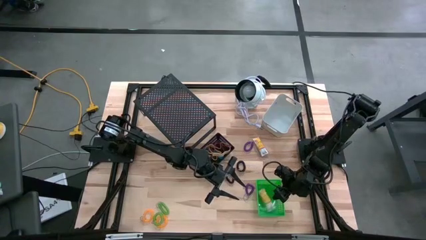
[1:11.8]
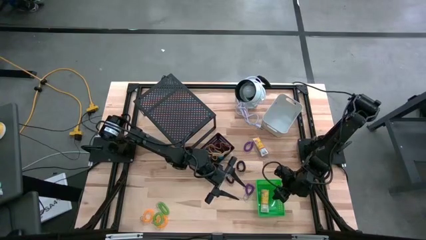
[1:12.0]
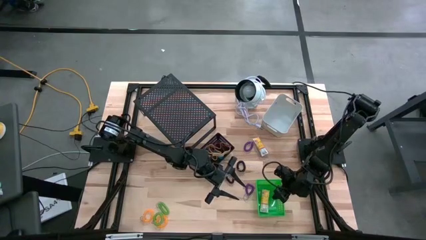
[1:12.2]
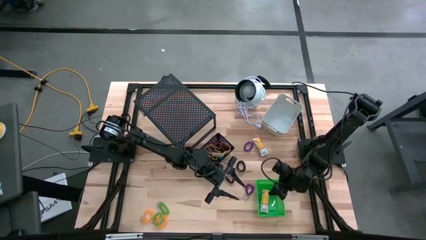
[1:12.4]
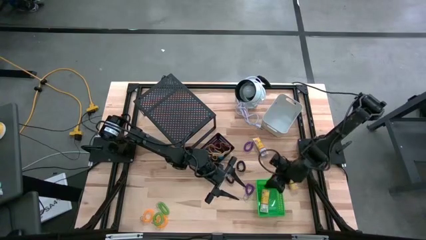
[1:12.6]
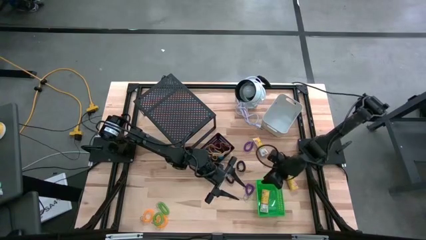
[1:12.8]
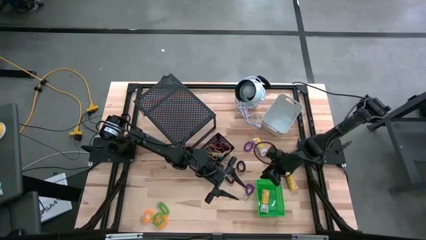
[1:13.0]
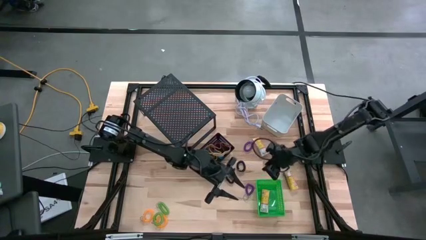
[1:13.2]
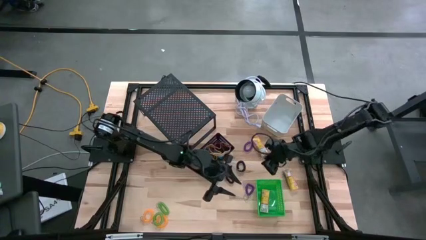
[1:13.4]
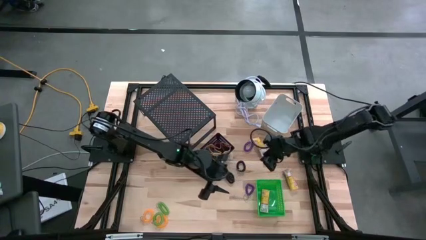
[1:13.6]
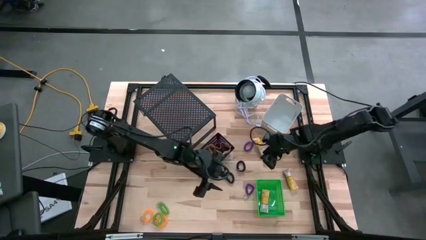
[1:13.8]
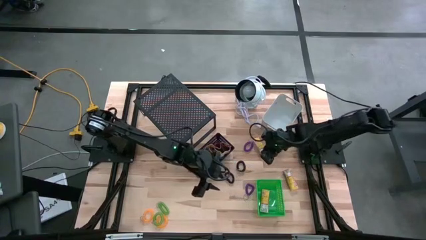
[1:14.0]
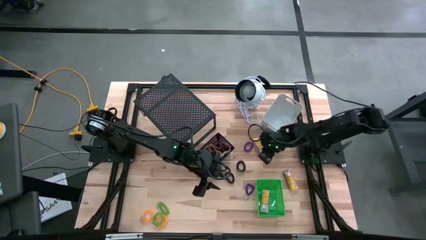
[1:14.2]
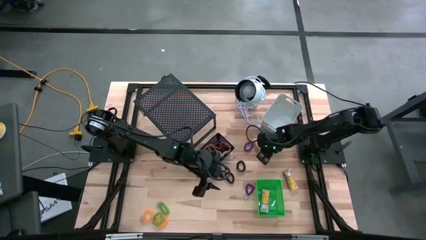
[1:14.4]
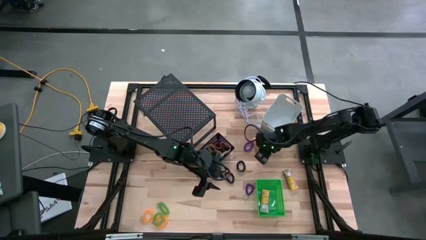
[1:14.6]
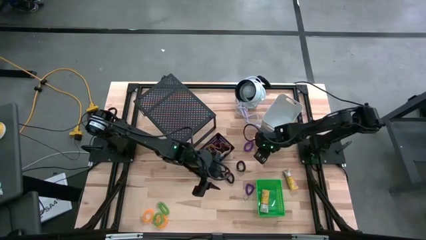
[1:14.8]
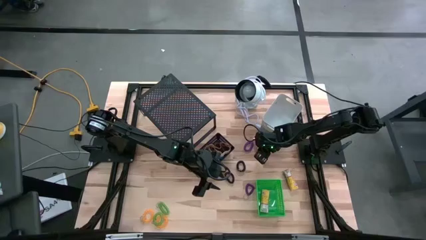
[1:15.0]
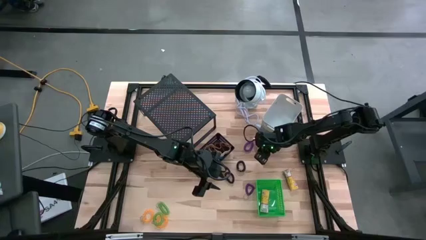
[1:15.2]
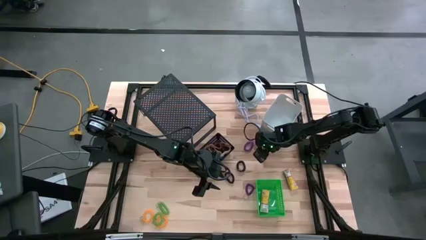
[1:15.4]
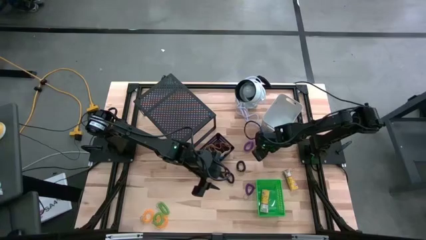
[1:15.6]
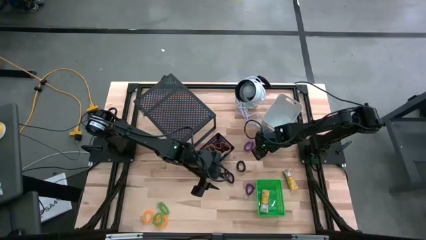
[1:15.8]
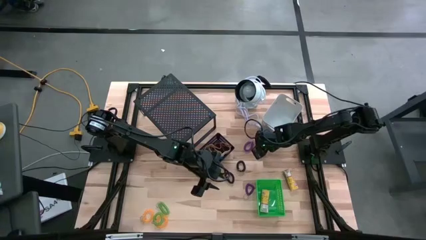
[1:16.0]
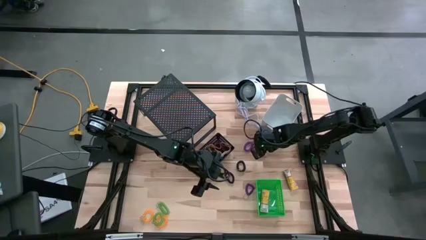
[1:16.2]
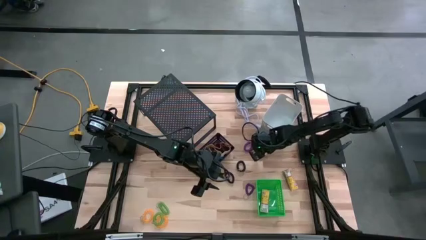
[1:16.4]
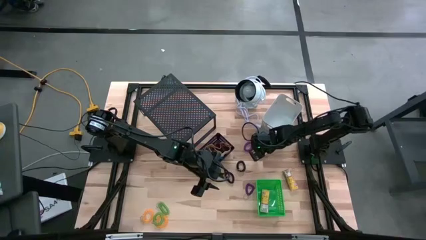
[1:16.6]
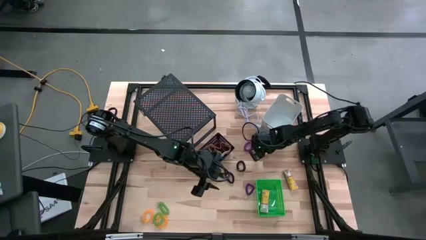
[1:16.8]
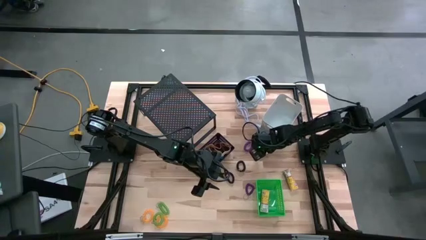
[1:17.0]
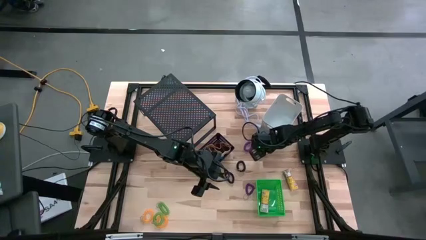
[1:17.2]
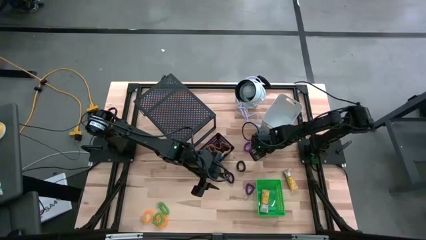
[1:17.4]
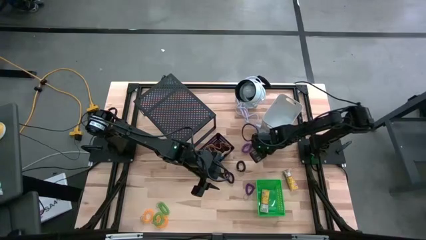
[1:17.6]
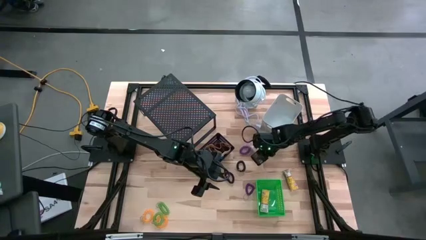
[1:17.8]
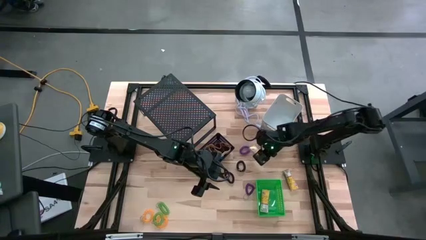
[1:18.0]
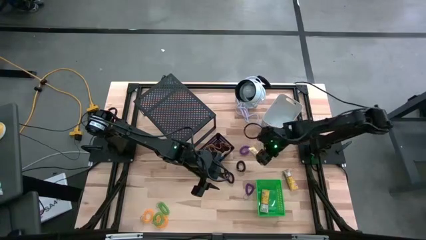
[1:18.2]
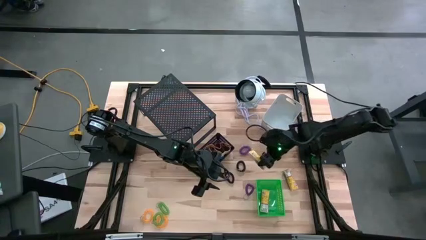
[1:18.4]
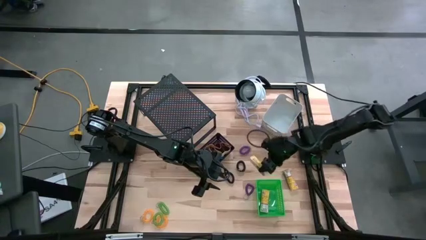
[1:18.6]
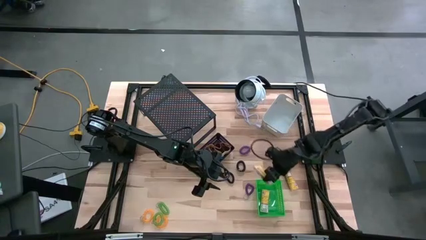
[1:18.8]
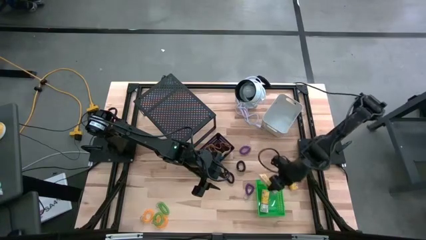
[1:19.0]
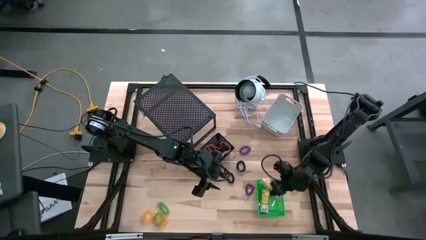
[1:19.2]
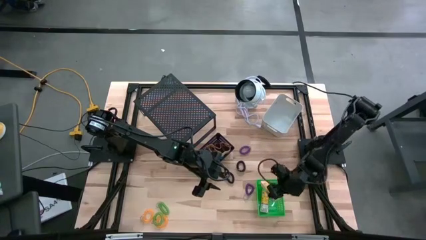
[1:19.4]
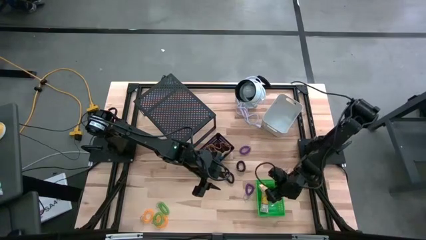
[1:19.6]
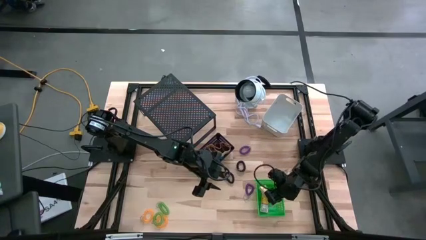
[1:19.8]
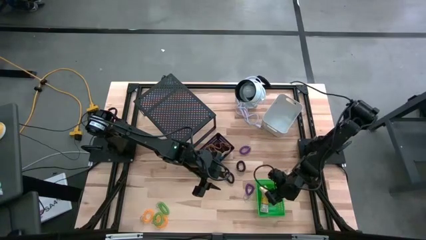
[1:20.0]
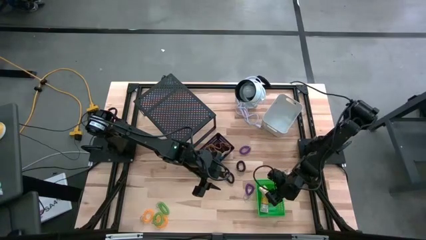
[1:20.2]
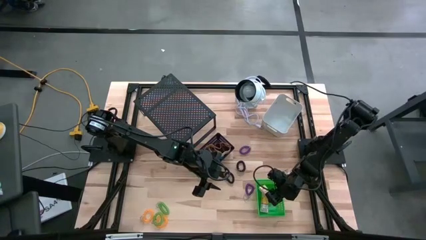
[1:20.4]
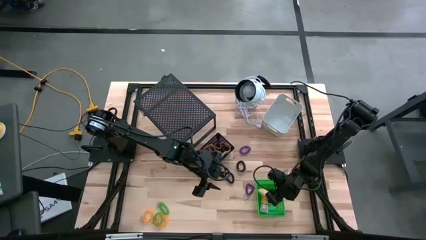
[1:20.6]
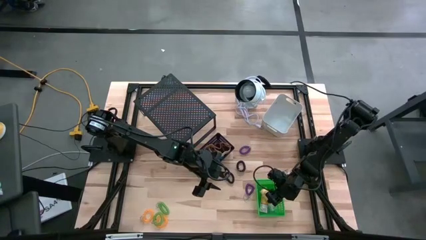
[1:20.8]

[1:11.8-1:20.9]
Task: Pick & Place Office Desk Supplies
Put the left crayon box into the green bin

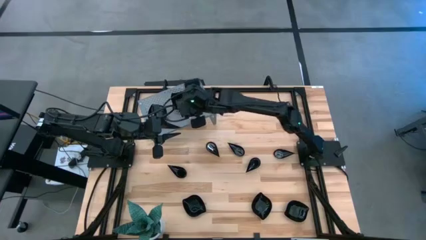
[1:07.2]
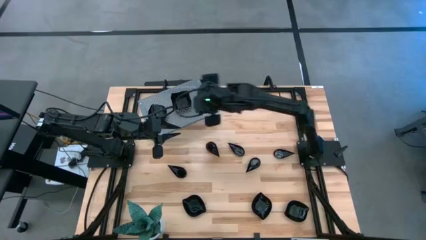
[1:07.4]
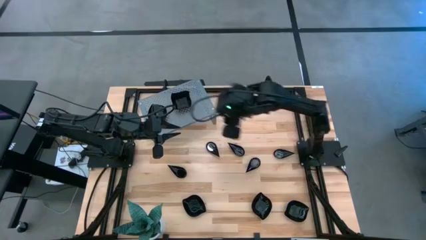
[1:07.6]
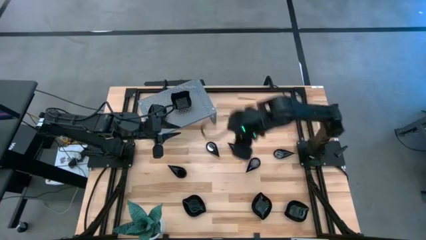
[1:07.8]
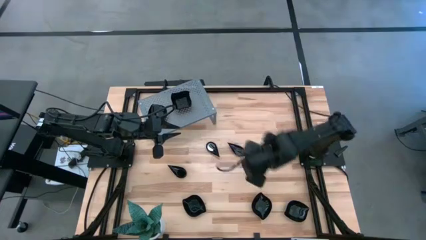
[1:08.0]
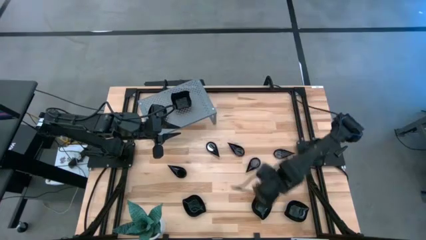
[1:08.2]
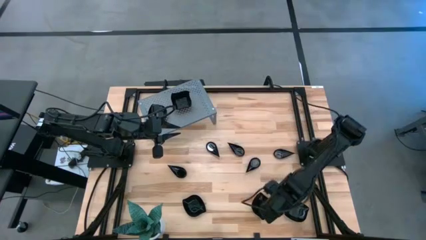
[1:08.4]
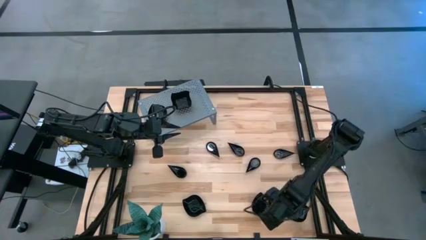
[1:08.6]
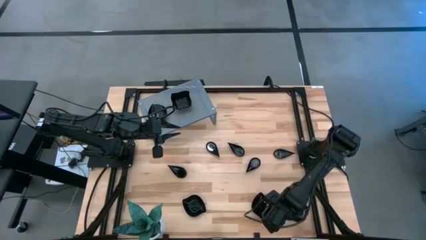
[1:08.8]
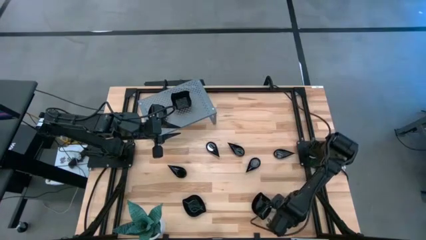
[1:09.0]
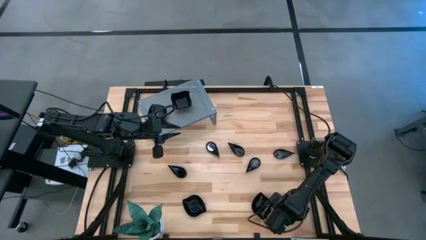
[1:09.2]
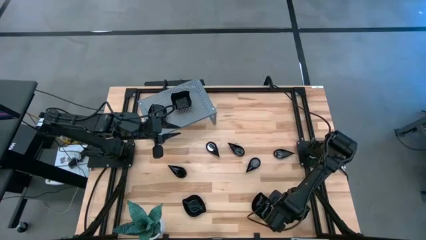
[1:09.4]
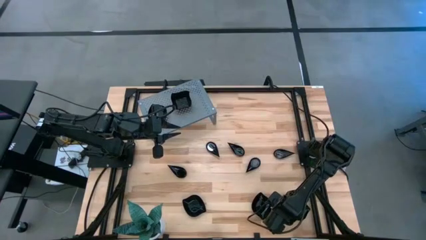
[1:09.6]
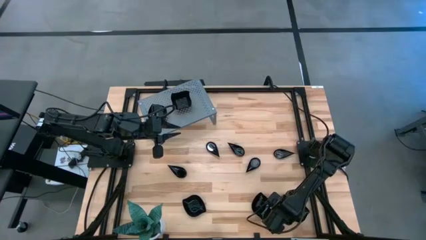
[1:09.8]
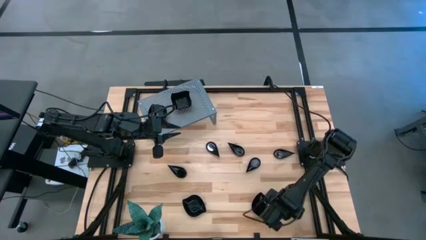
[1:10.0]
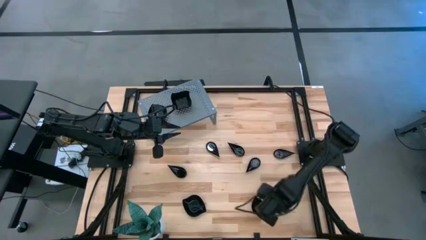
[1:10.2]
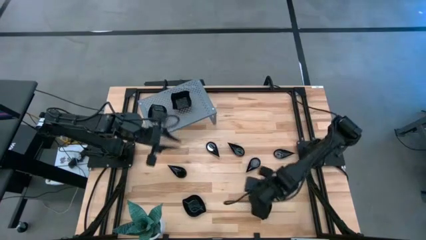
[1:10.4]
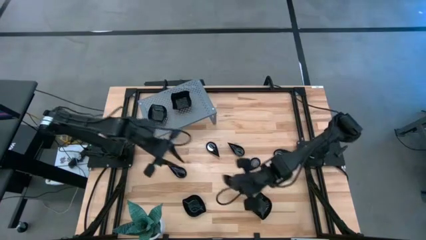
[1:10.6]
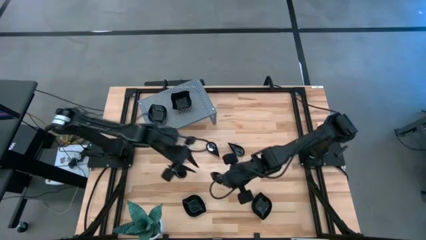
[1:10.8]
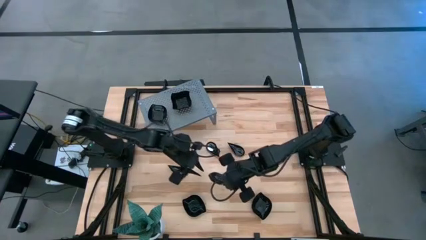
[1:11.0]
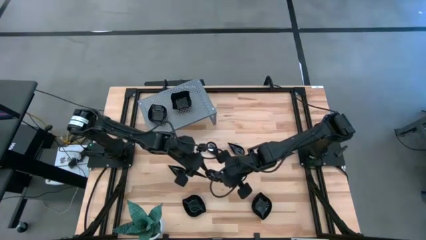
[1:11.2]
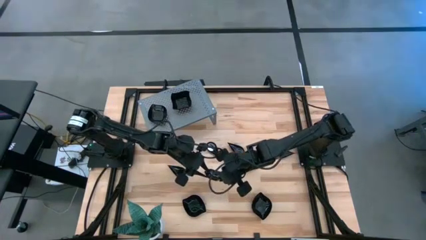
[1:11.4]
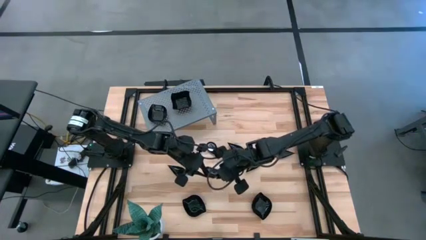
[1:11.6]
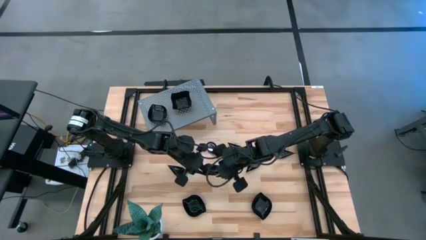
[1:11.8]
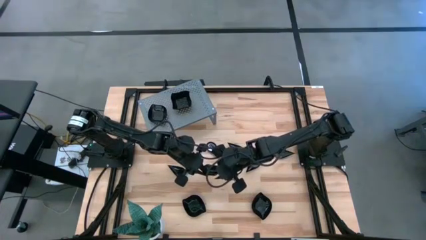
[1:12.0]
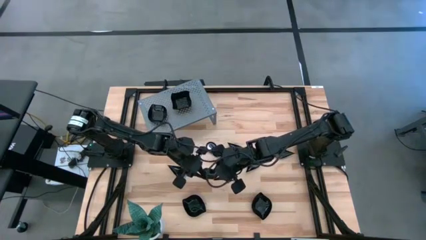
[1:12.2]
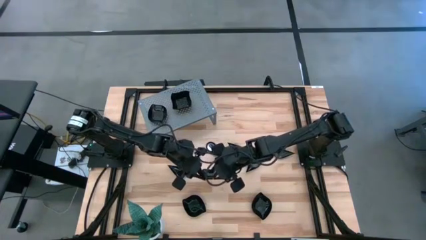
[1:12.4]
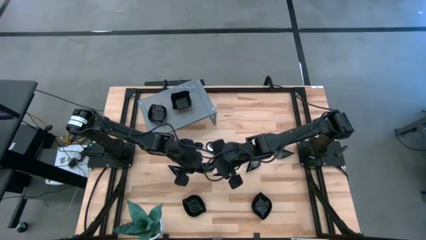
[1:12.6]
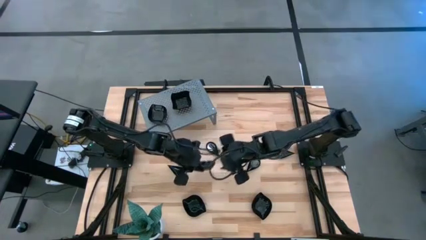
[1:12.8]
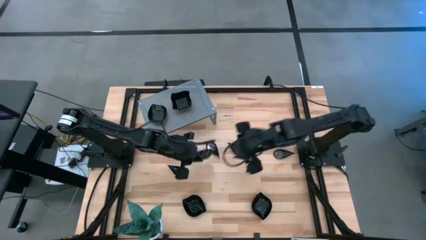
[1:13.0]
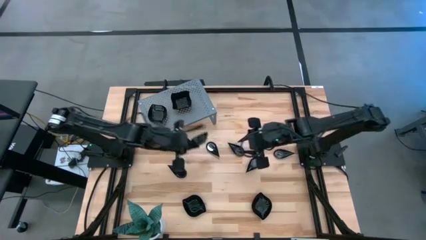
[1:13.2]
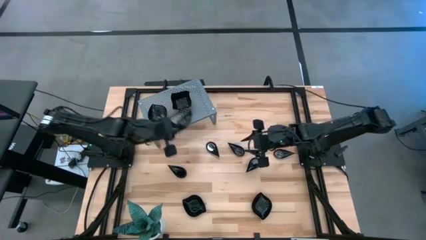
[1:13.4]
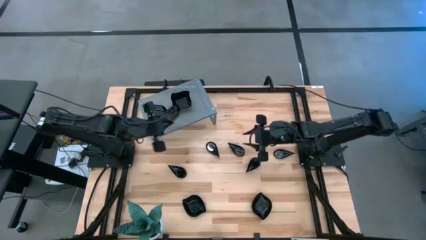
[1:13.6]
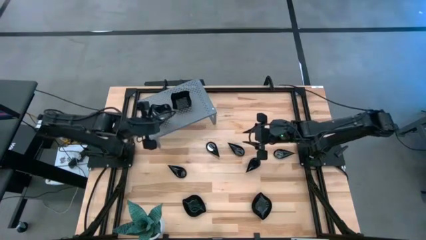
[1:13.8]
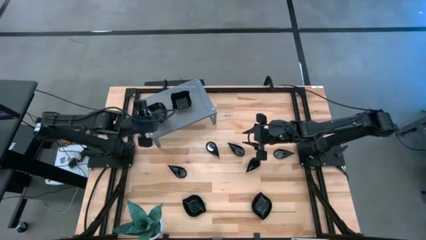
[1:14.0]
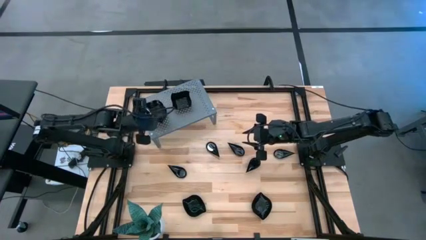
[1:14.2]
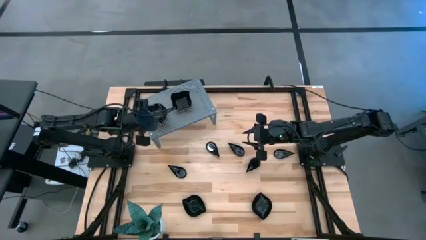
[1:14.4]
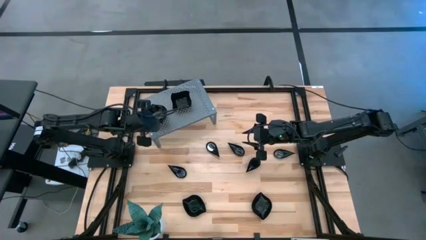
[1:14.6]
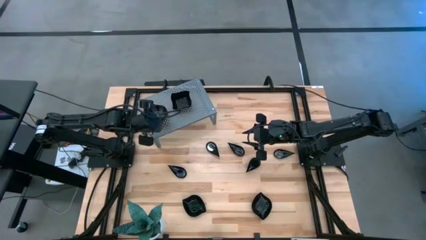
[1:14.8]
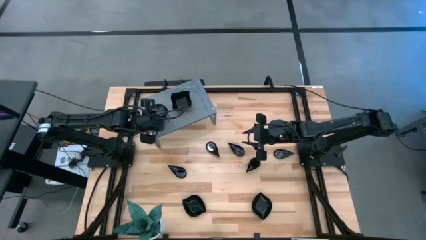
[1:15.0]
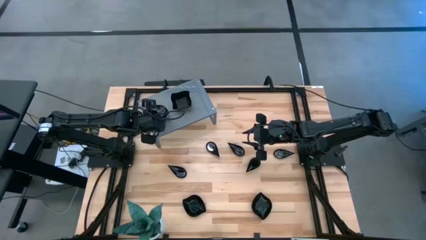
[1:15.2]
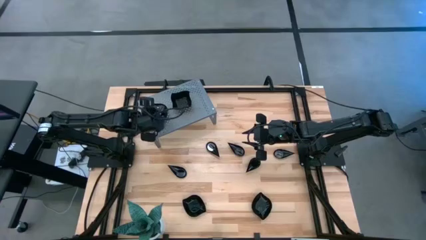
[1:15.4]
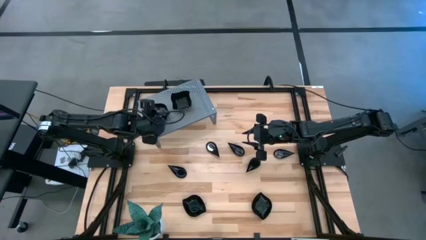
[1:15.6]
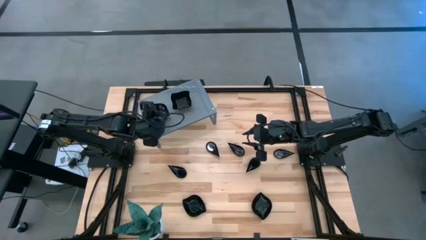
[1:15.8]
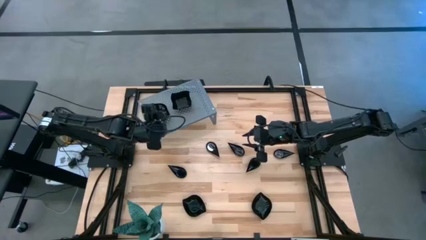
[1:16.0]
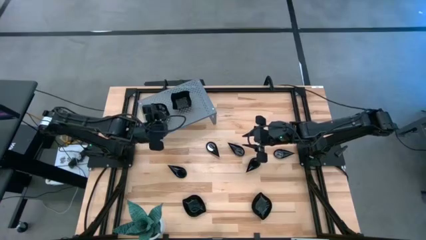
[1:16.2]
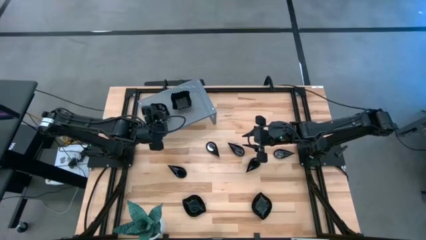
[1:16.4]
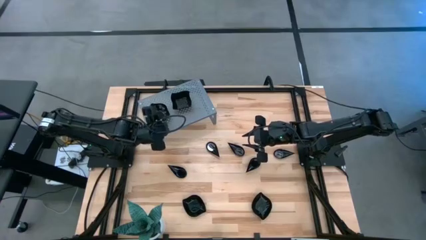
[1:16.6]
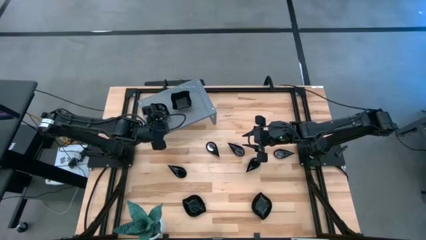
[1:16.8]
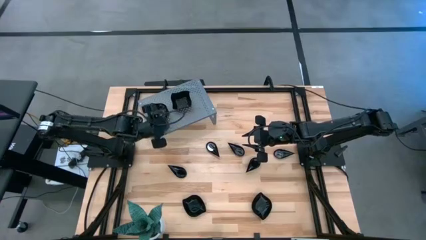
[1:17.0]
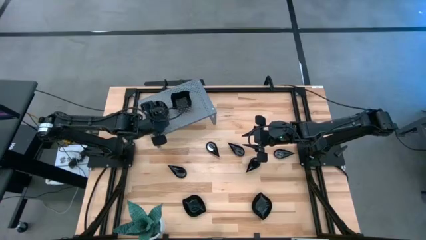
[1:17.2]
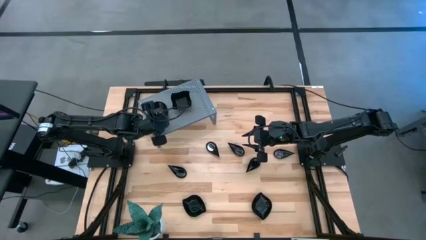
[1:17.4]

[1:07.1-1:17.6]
Task: Pick & Place Mini shaped plates
Stack the black leaf-shaped plate on top of the black leaf-shaped plate on the shelf
